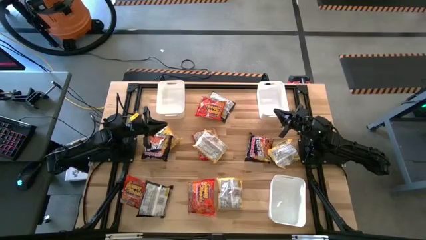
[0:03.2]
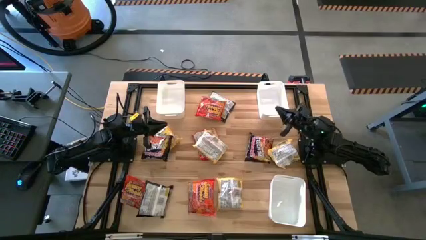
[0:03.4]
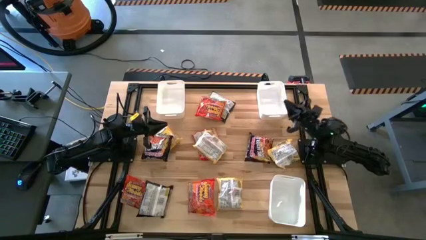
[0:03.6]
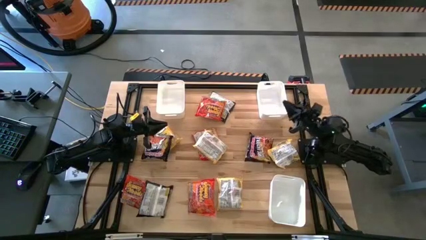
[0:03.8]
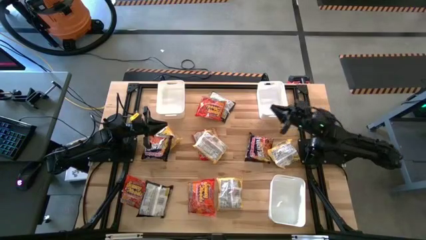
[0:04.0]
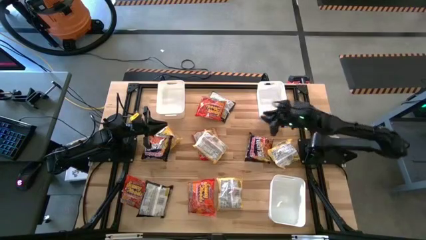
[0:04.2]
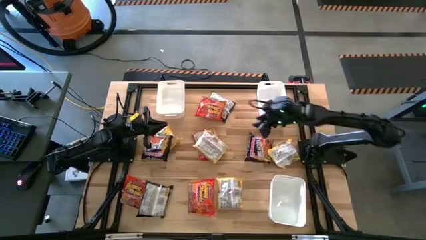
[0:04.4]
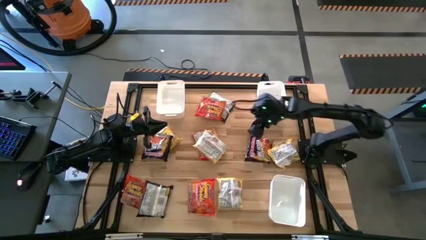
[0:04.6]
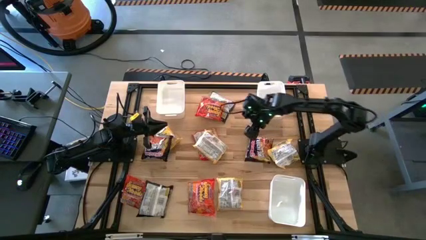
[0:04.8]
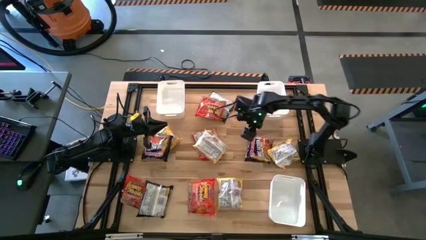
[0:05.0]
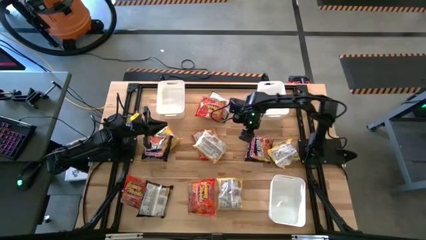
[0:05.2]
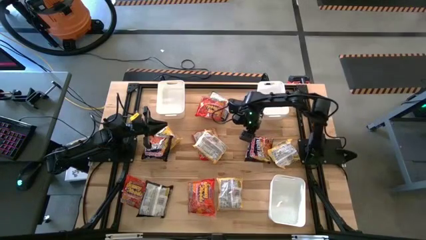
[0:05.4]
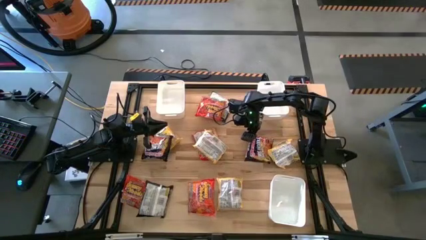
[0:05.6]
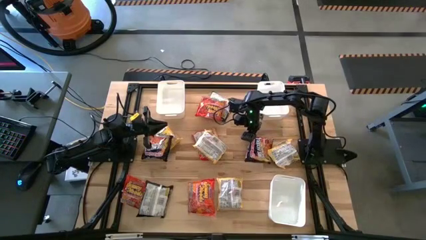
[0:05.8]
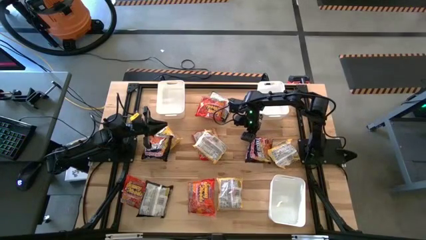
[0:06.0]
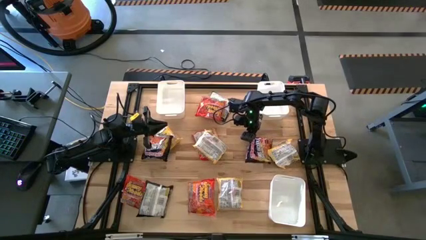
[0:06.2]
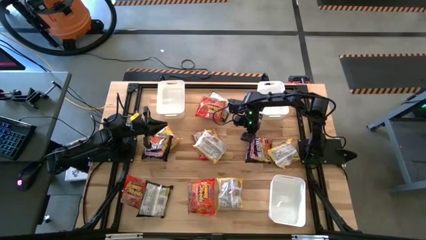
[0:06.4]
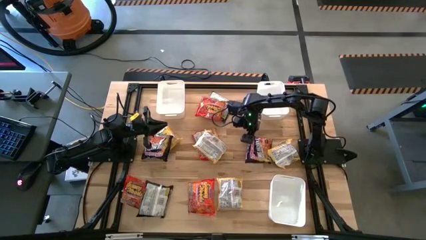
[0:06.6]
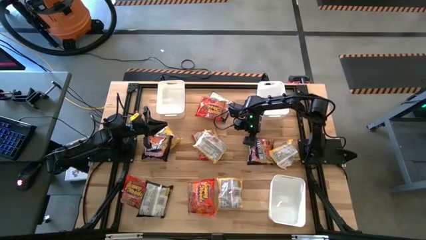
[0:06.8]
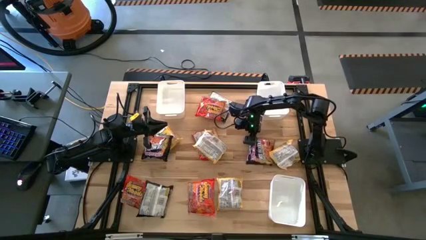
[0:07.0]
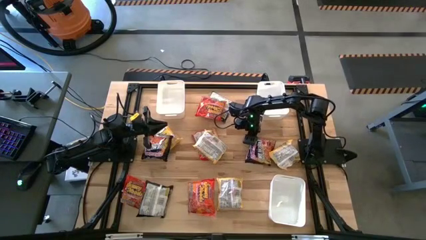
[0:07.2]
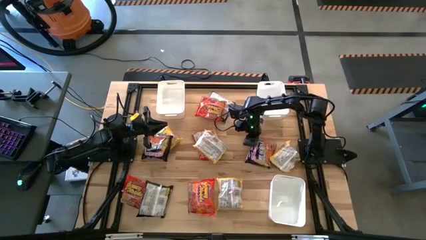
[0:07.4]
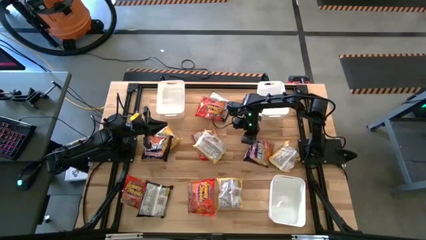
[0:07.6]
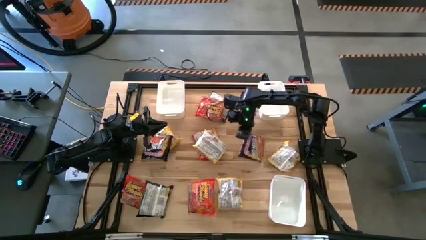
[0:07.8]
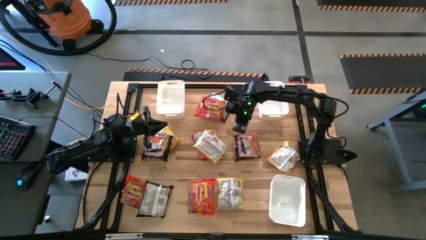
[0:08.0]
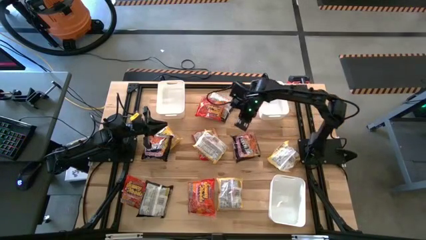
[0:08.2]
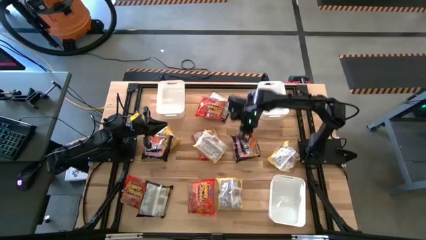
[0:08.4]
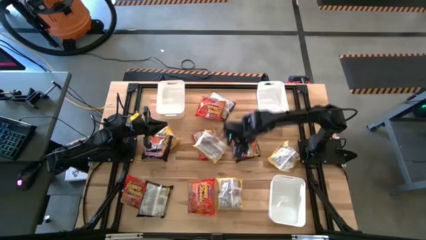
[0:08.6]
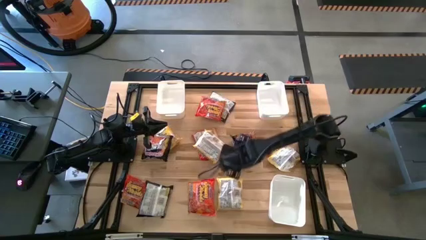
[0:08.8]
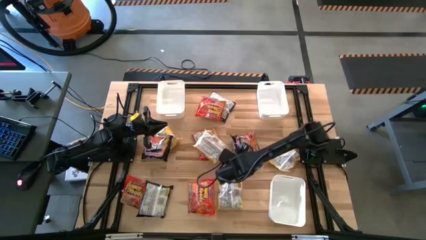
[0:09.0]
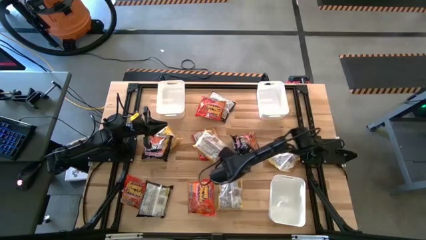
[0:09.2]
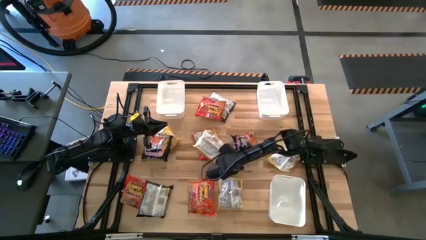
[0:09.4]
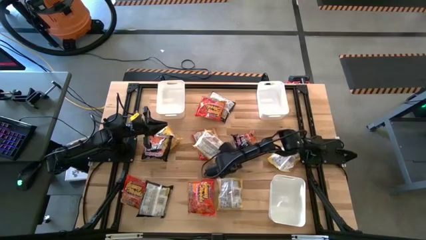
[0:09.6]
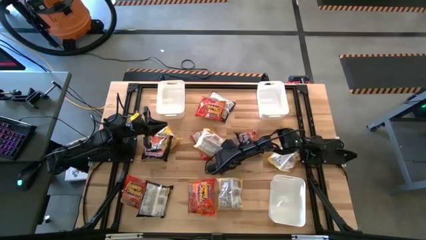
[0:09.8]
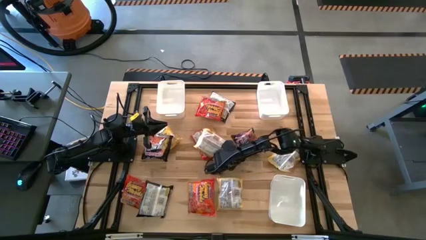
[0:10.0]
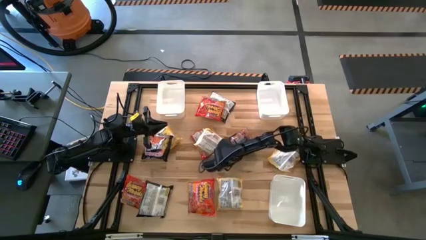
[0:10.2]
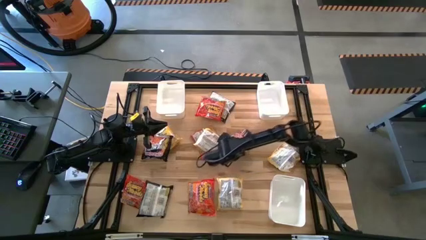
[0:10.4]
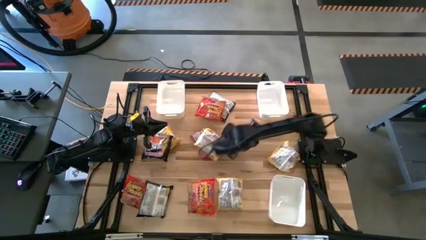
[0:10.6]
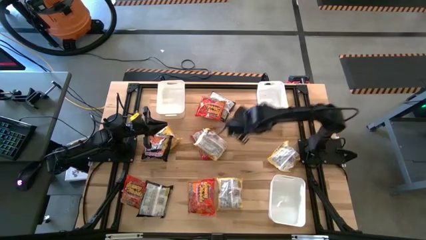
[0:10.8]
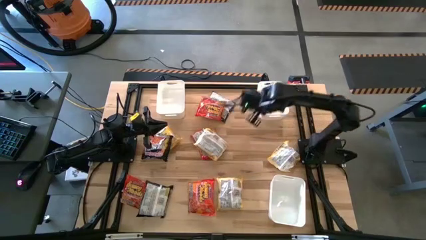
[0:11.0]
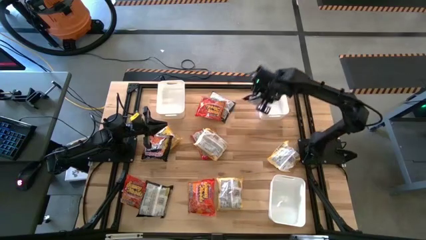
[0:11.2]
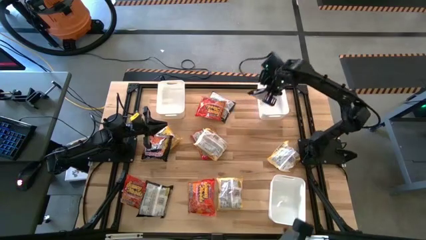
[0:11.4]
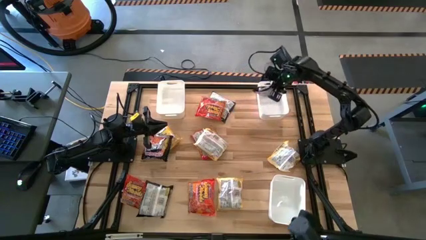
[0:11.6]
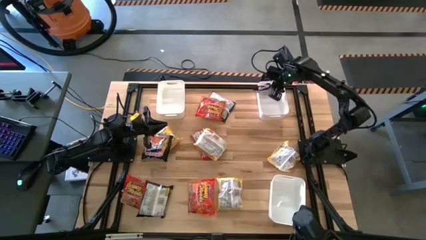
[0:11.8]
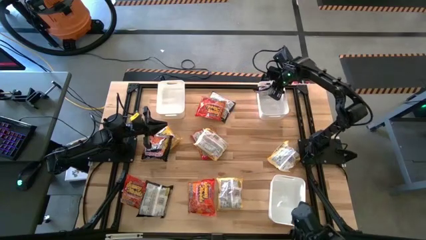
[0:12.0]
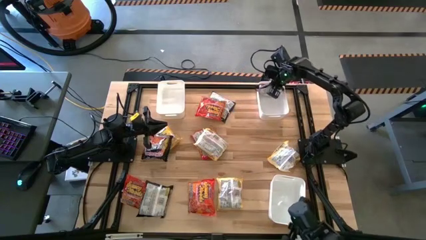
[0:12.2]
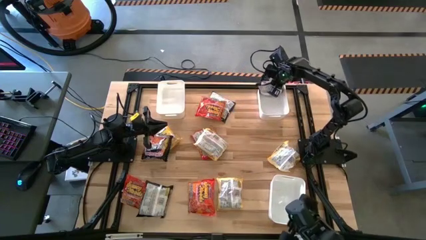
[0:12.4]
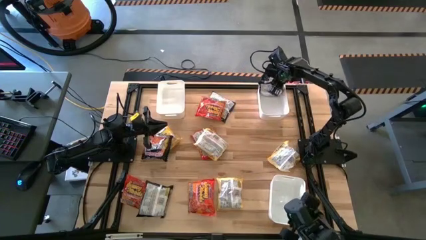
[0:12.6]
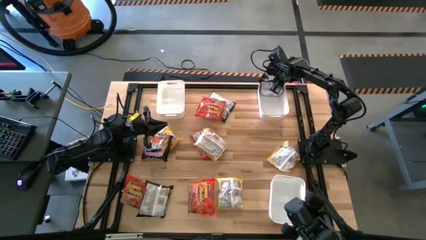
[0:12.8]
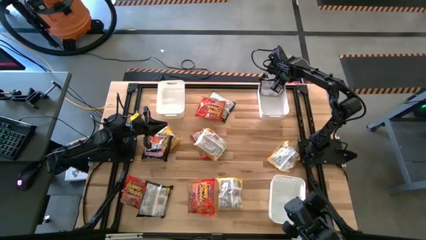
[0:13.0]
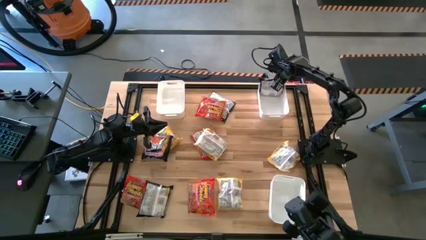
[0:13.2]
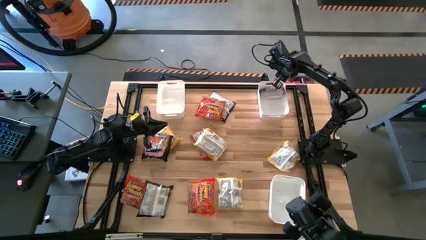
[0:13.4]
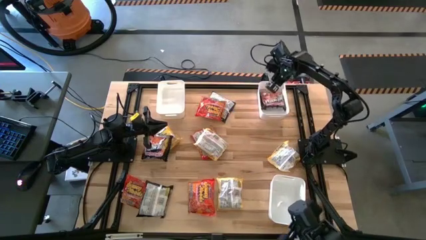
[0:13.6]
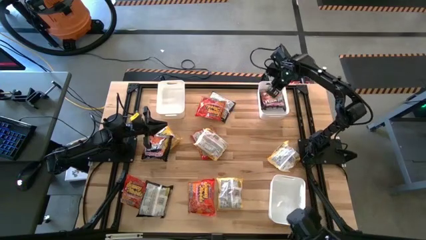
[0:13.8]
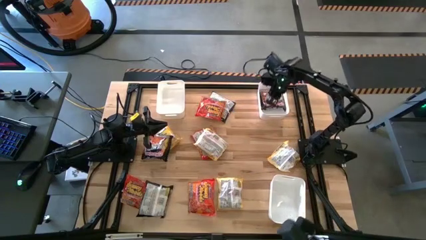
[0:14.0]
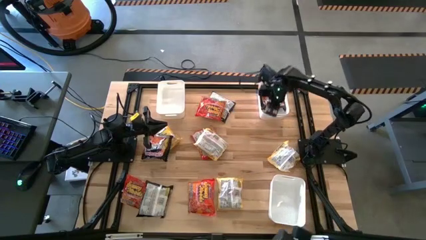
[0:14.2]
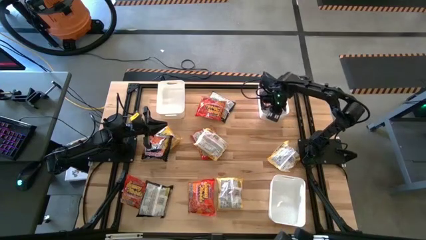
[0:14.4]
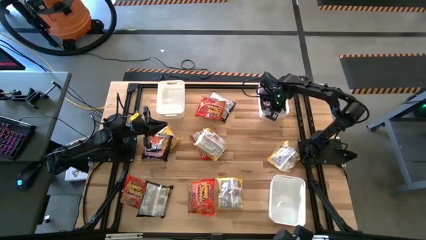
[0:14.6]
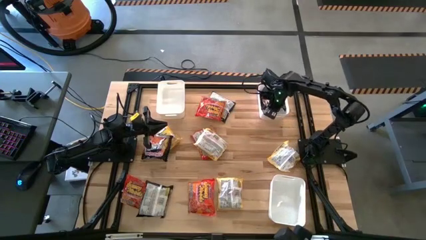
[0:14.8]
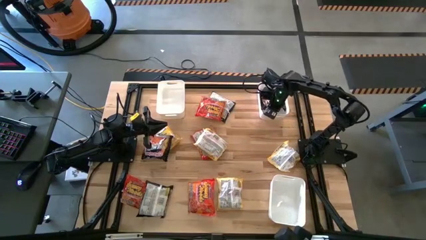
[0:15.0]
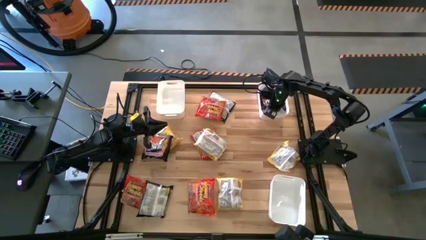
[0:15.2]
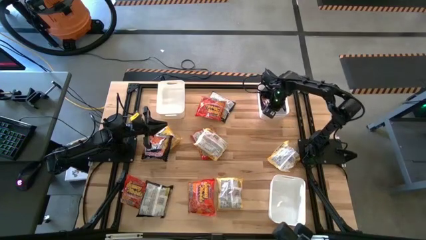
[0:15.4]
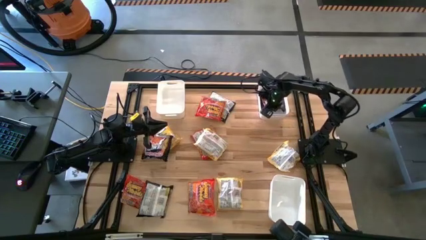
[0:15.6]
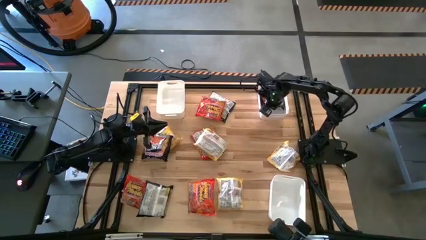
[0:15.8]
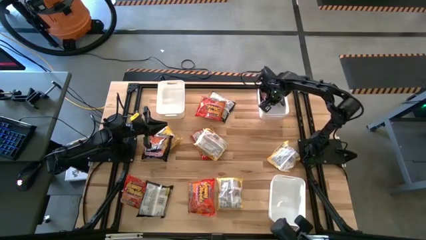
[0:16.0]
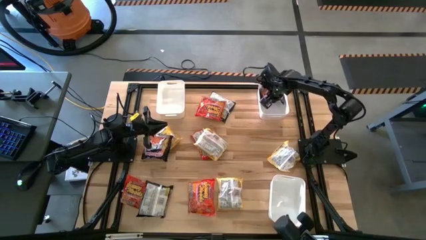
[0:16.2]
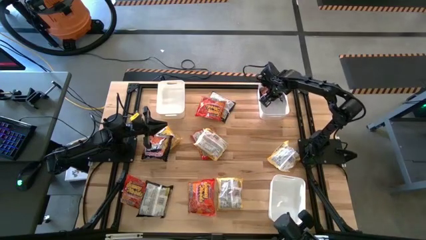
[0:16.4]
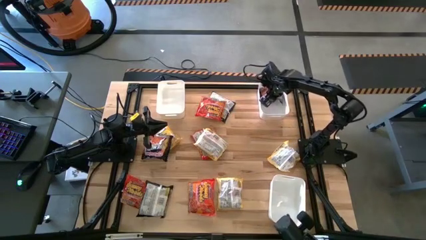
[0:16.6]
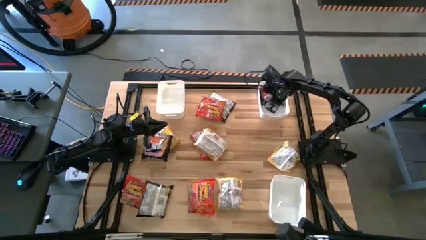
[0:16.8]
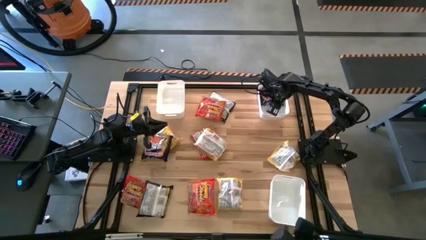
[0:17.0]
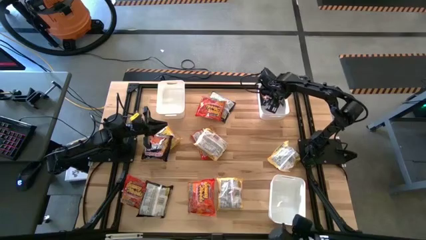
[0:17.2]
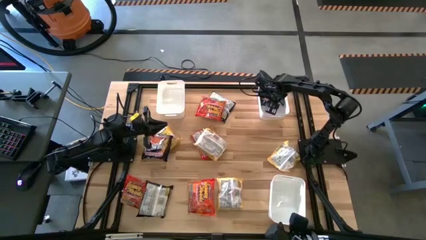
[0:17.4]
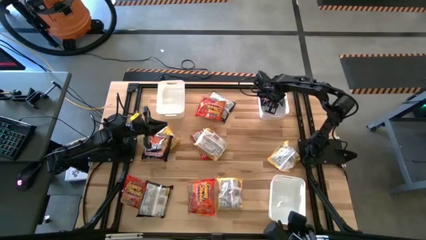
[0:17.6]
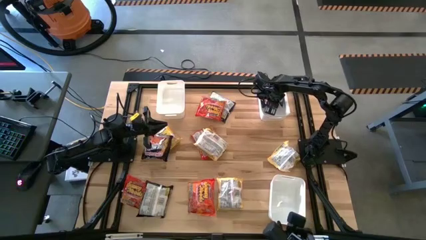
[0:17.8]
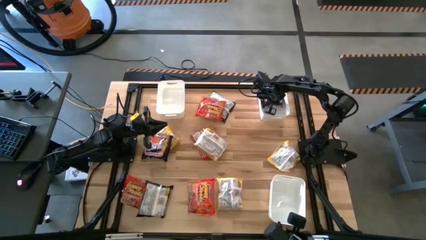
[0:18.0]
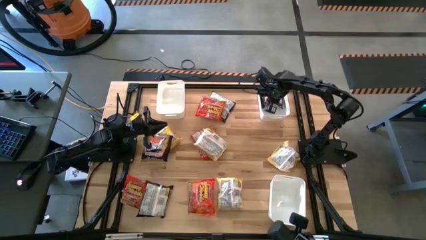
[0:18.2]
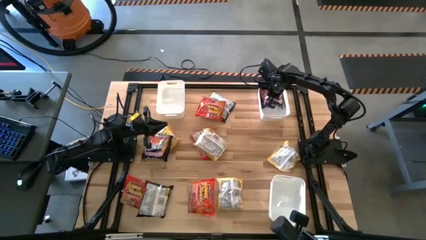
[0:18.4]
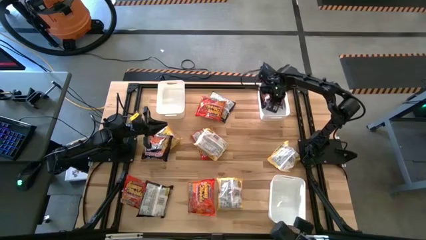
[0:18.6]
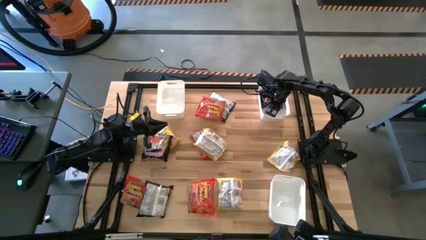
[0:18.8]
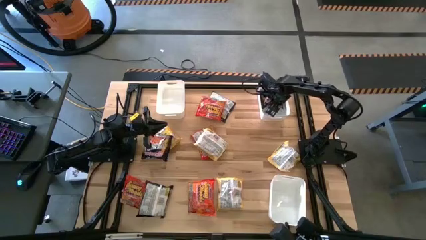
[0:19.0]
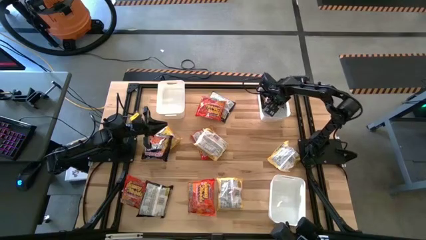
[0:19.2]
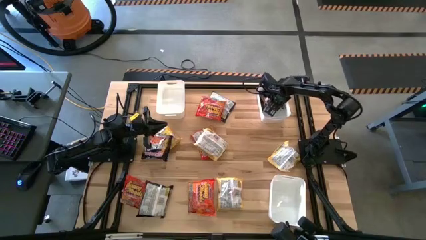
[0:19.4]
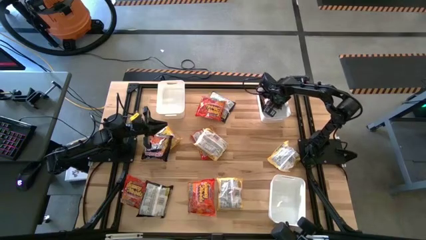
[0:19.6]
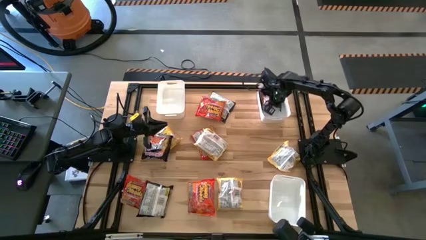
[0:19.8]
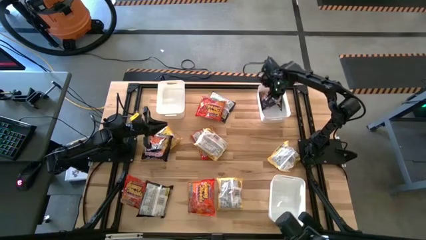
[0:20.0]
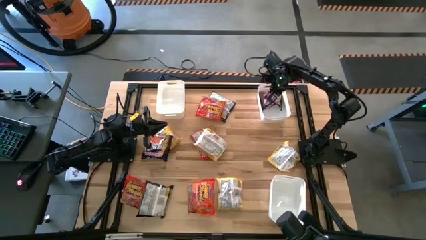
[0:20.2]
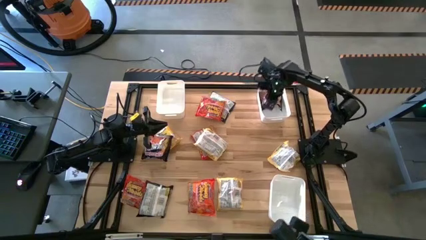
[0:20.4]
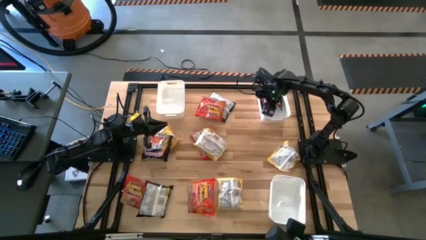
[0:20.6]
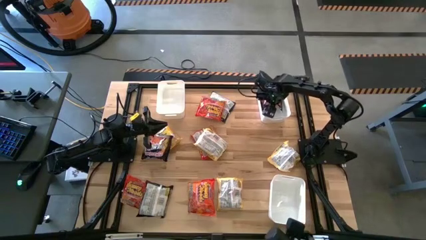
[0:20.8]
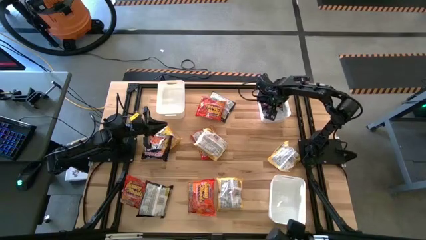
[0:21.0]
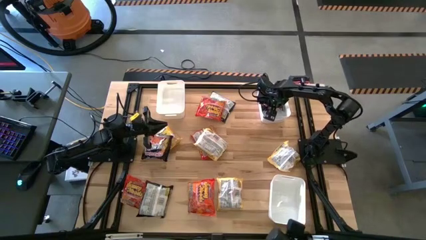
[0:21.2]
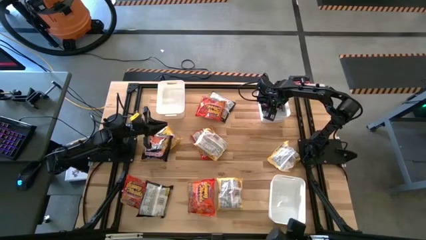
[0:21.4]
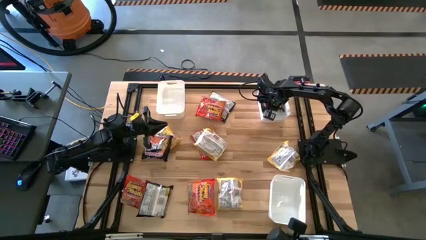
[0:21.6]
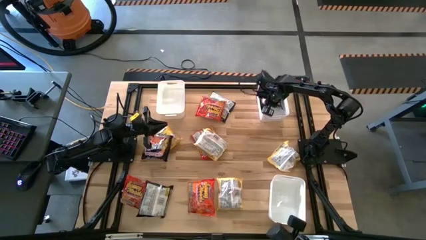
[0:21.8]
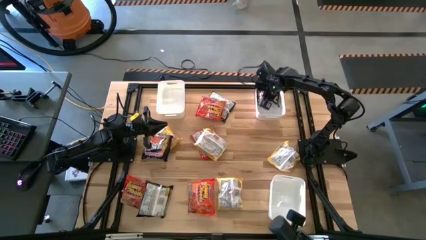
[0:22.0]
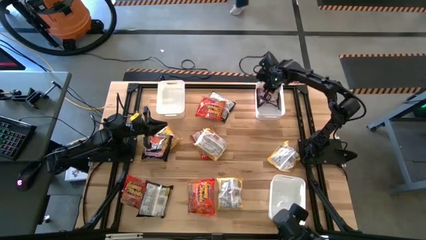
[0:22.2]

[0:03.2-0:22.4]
Task: Sort Maruchan noodles
Put the black noodle pack into the top right white bin
